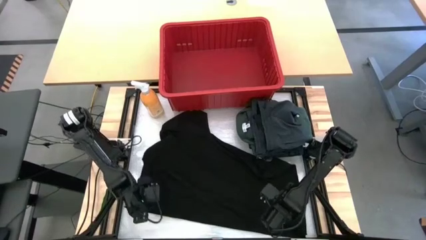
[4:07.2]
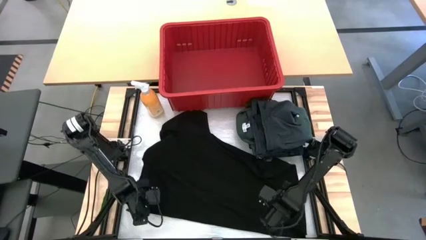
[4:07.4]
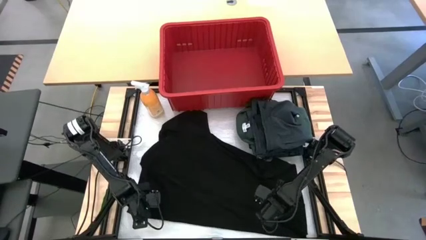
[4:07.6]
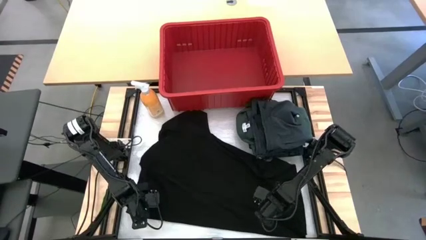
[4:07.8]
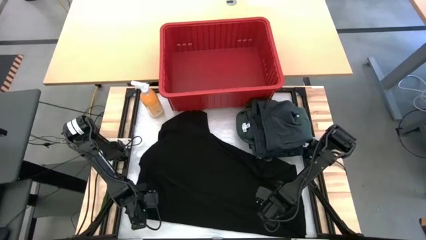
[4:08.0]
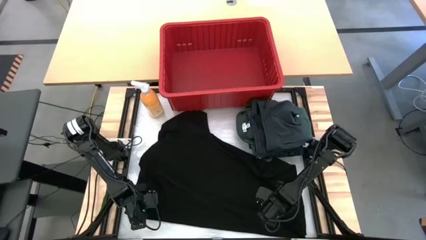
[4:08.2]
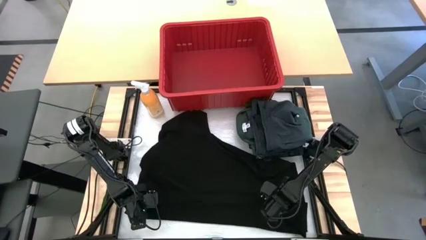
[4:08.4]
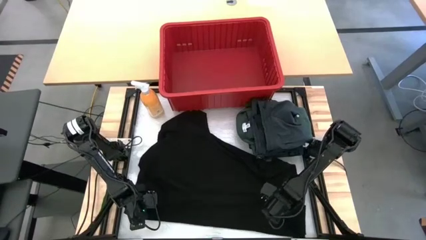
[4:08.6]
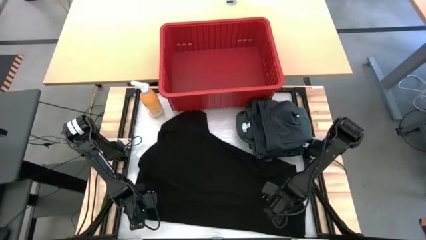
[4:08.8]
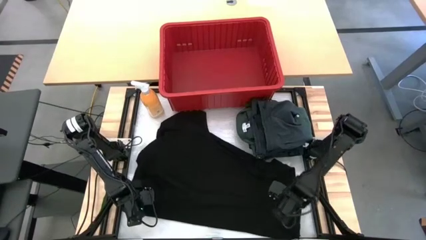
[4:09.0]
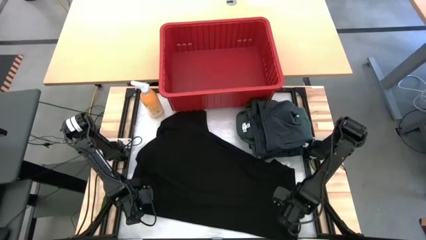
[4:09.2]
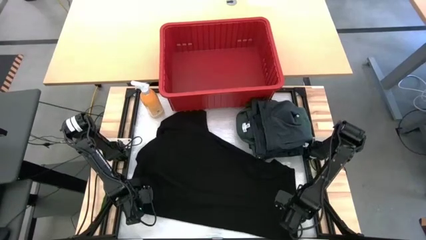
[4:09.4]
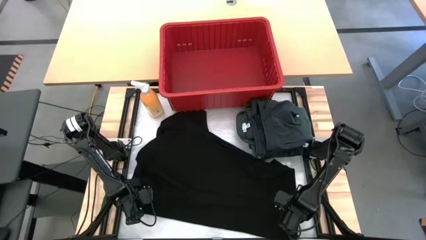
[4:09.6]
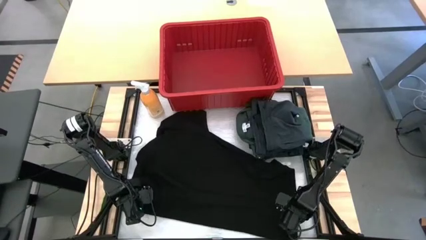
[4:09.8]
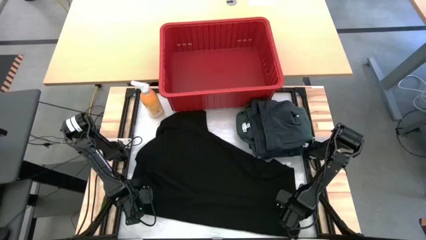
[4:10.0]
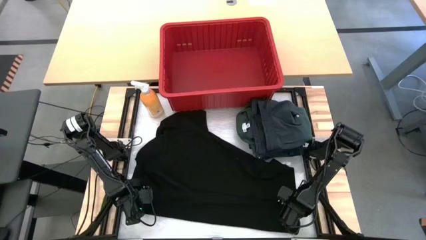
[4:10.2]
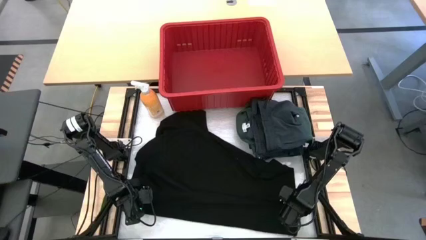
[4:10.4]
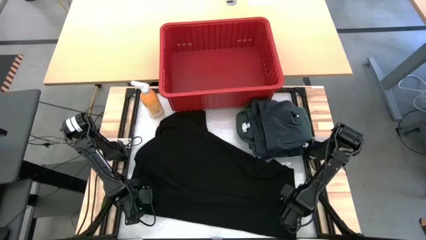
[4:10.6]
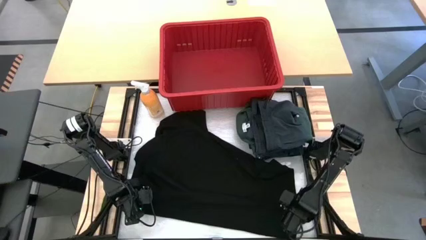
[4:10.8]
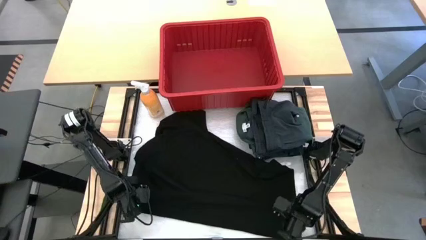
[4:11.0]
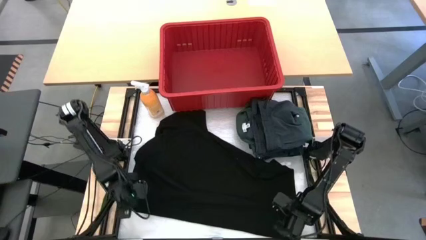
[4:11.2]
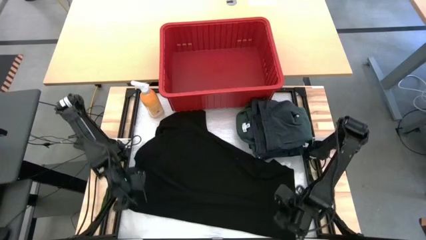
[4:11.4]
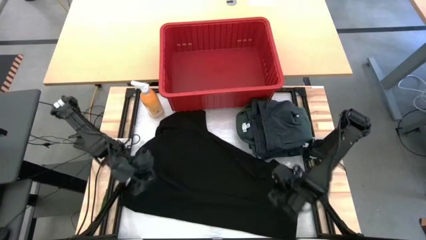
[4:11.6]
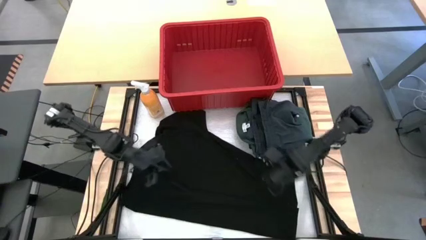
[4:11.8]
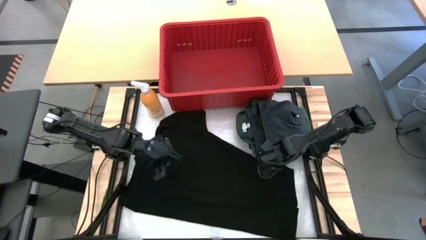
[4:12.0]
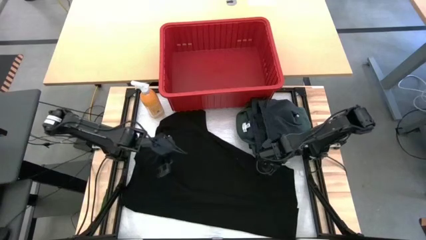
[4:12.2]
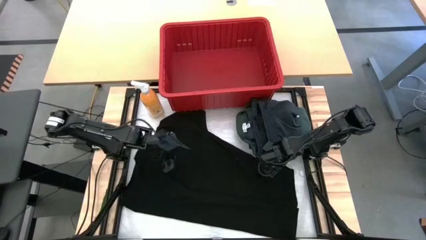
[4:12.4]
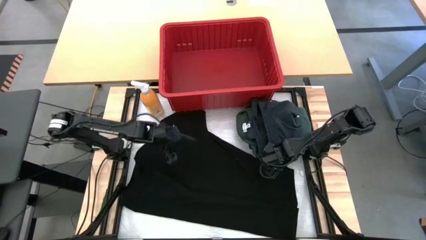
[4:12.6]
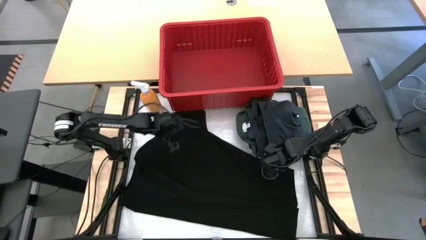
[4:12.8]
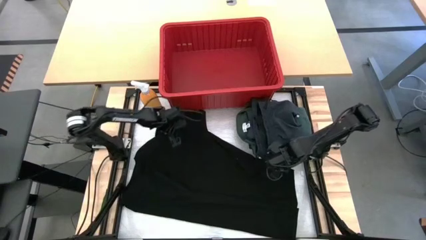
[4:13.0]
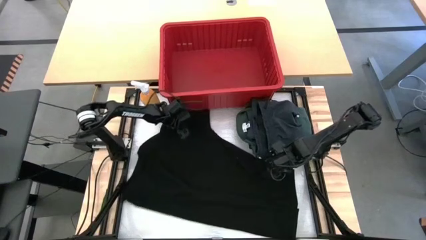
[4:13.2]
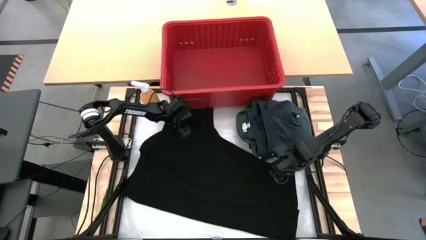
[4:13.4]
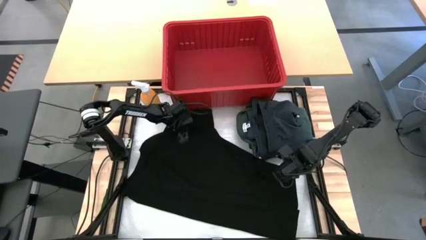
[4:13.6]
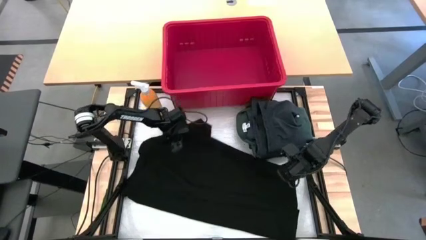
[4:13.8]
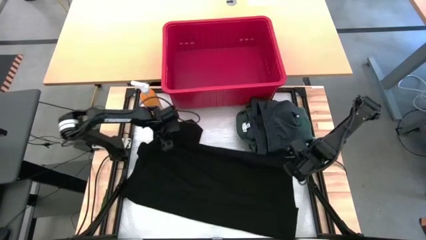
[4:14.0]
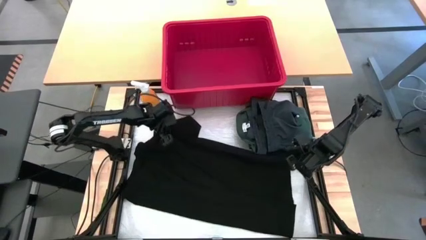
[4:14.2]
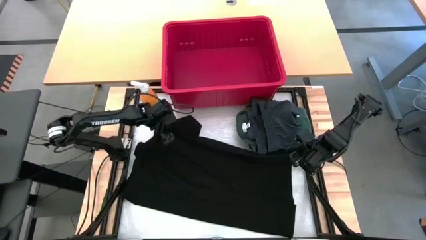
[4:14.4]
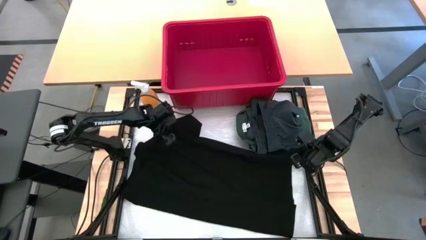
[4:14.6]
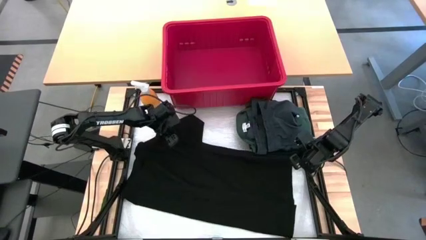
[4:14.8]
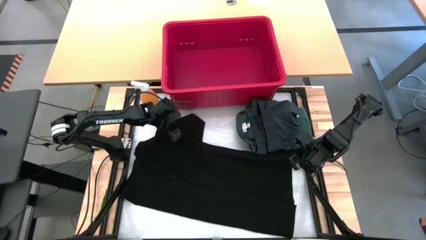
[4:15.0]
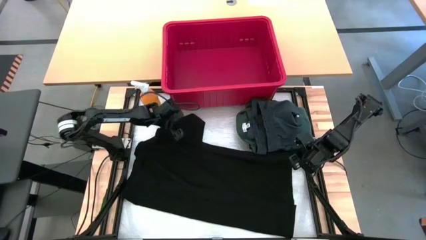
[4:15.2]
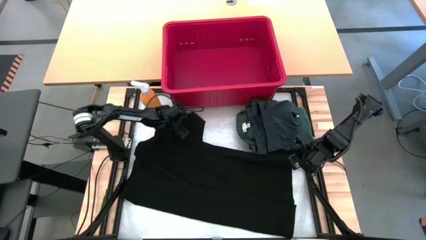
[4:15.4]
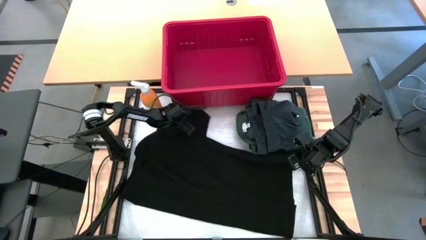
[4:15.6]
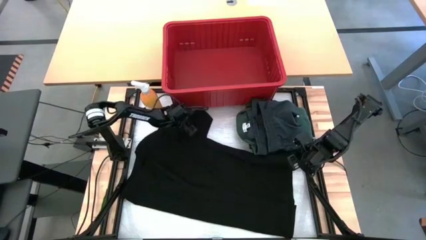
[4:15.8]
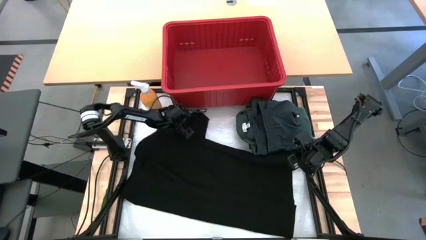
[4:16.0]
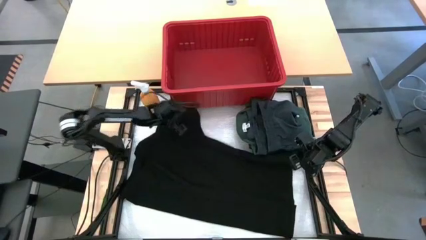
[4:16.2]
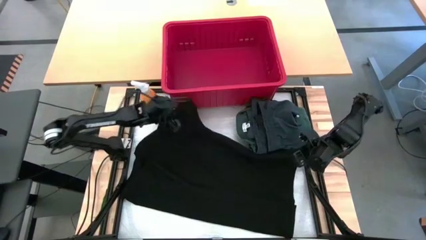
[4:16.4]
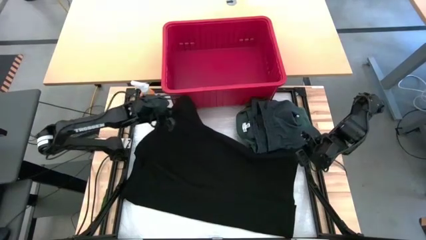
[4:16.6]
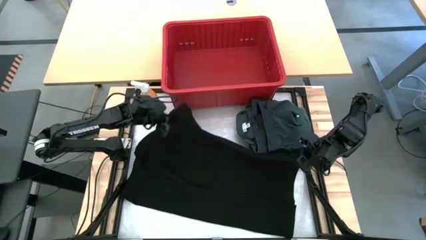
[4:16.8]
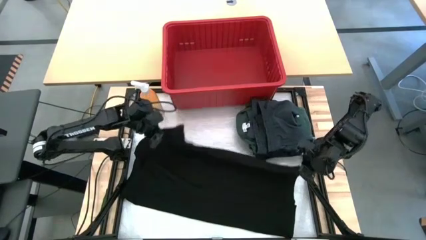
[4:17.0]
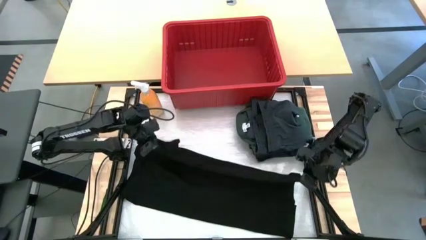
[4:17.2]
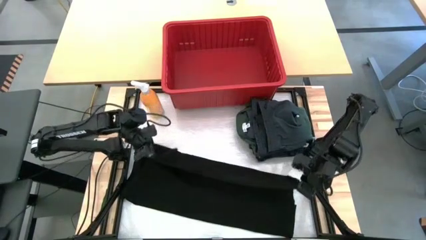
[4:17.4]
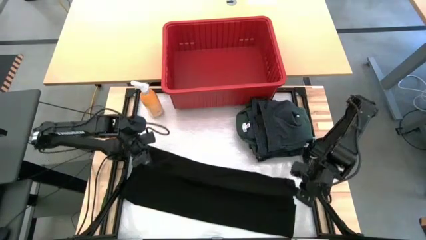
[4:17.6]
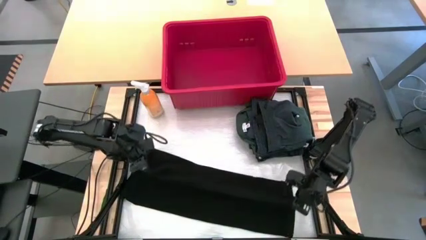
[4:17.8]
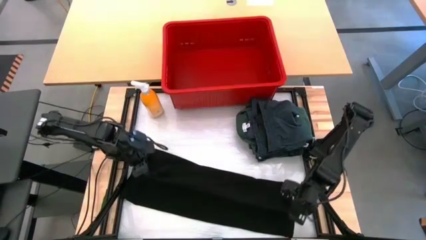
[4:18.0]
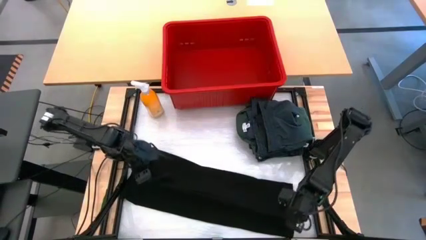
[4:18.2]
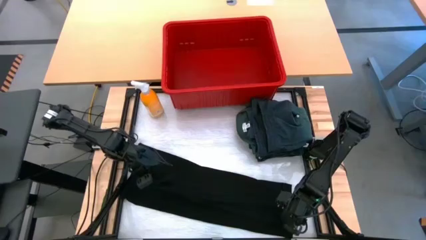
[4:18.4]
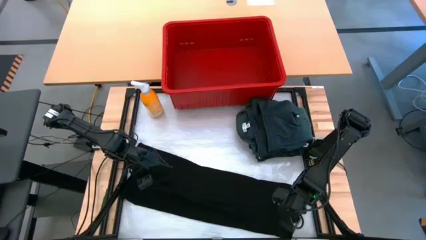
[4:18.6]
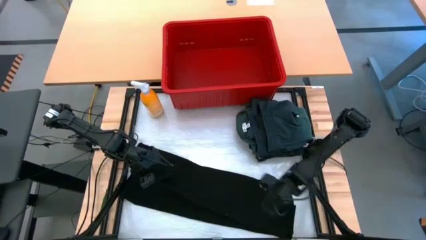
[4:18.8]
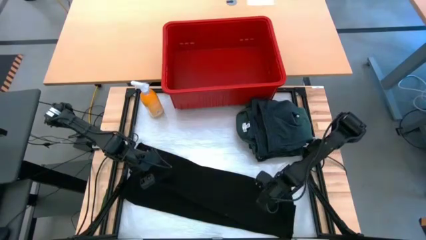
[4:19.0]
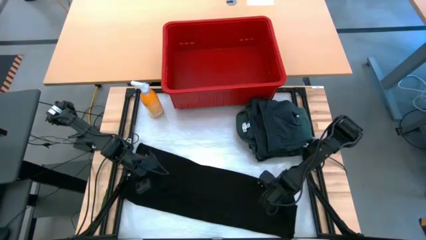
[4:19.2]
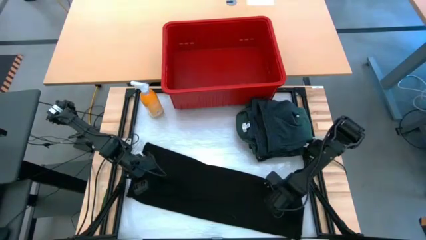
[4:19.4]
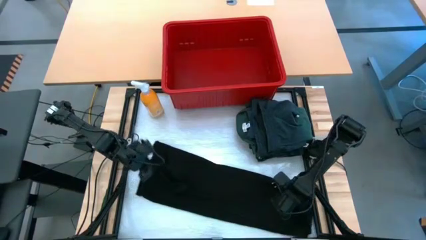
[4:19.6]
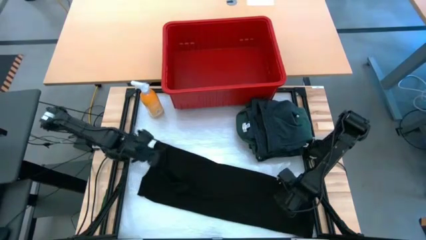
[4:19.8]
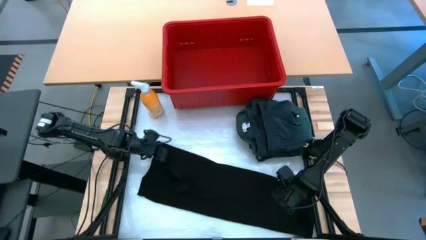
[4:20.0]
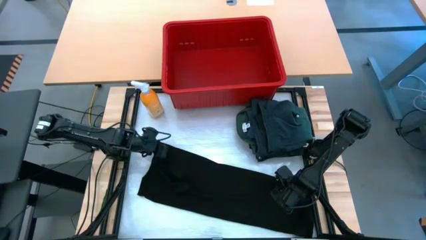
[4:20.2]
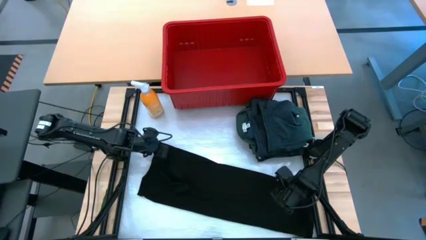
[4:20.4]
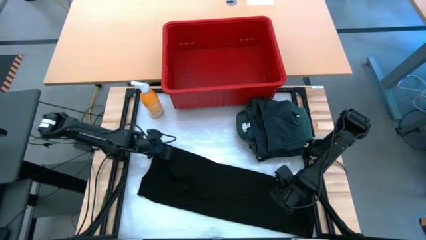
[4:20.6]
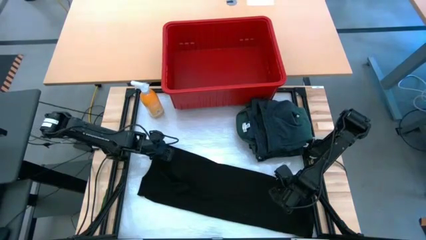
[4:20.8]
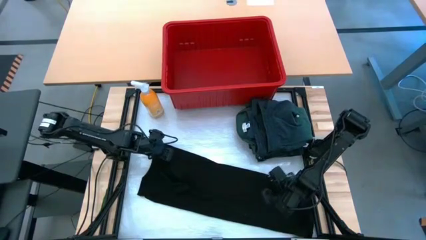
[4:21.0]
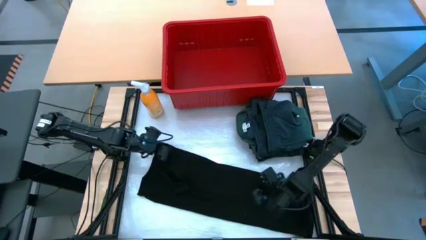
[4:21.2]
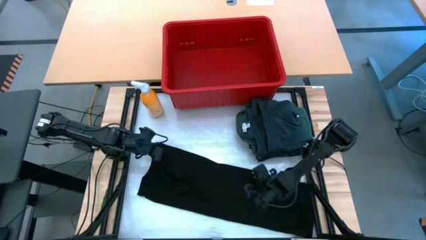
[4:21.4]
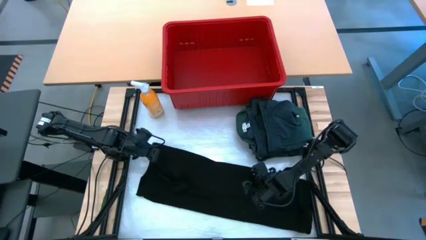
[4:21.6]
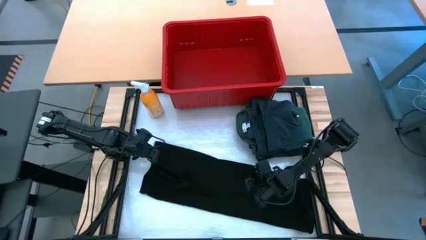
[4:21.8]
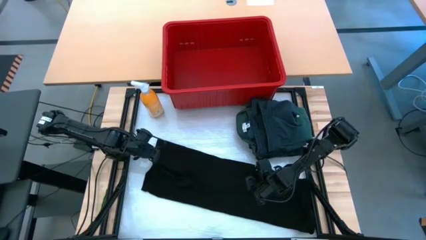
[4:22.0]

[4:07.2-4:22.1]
Task: Fold Laundry from Bin
Fold the black shirt
